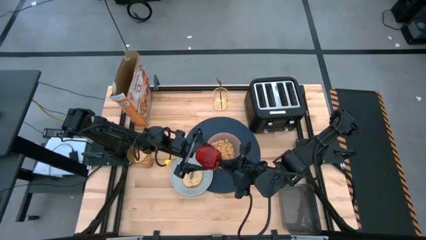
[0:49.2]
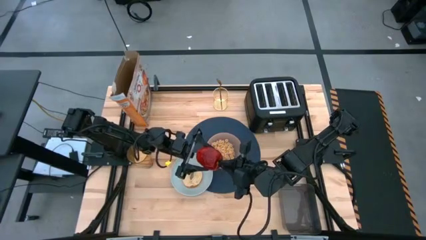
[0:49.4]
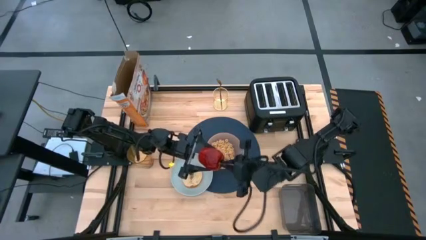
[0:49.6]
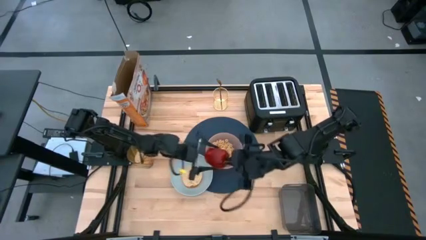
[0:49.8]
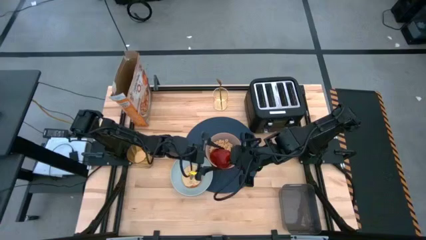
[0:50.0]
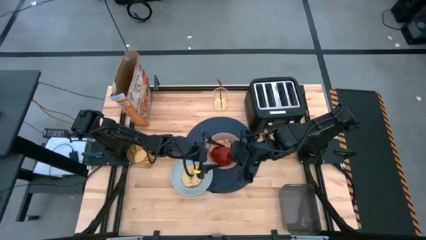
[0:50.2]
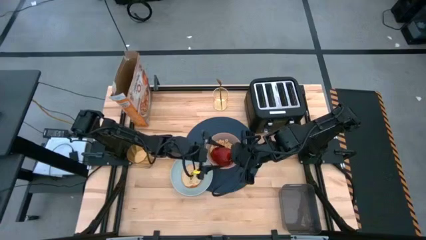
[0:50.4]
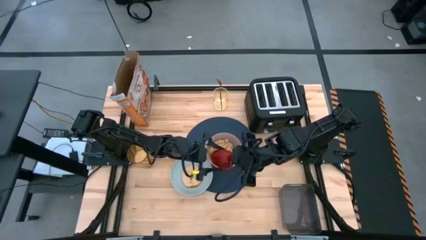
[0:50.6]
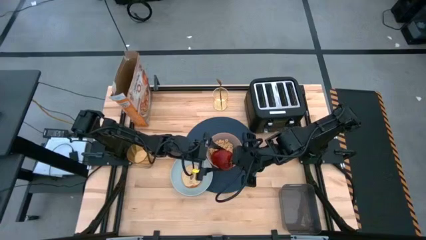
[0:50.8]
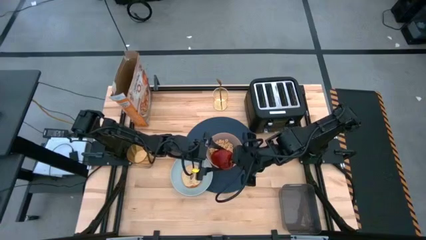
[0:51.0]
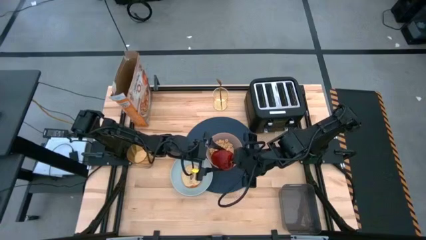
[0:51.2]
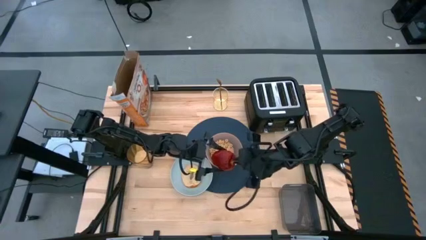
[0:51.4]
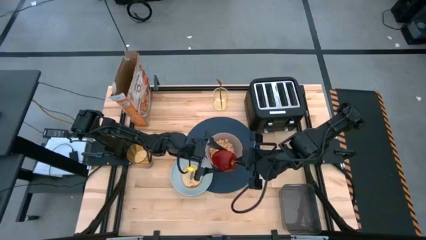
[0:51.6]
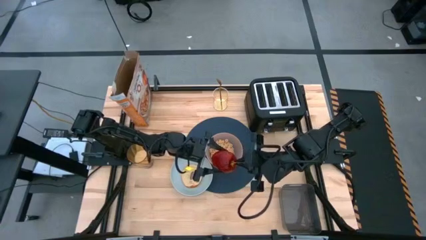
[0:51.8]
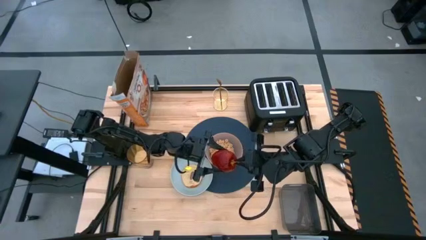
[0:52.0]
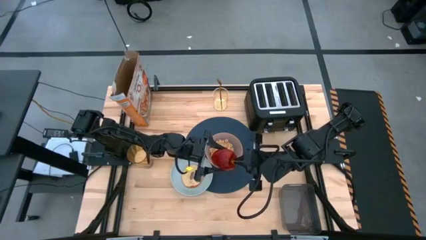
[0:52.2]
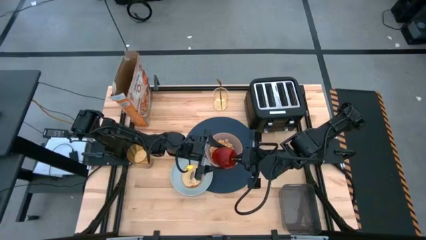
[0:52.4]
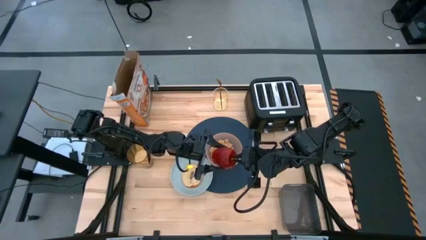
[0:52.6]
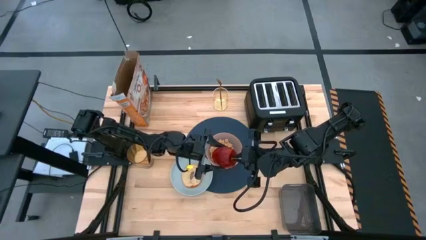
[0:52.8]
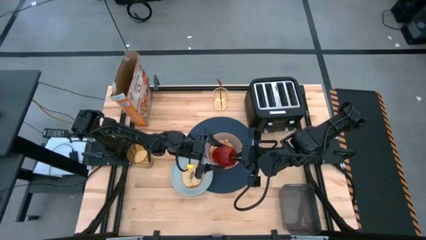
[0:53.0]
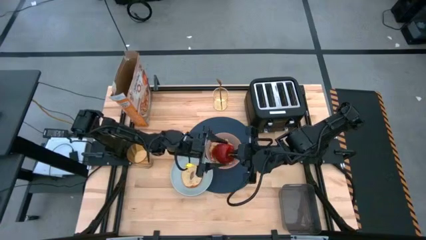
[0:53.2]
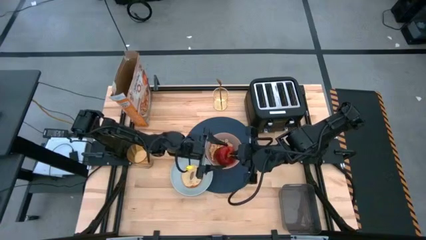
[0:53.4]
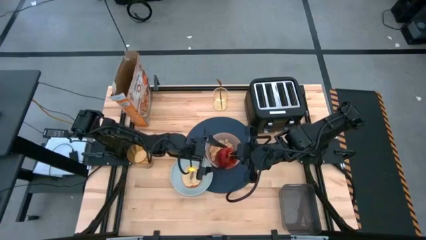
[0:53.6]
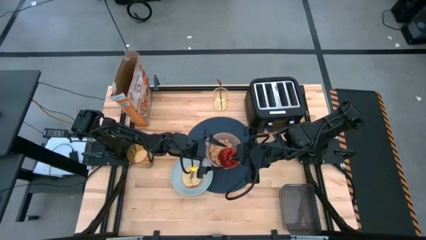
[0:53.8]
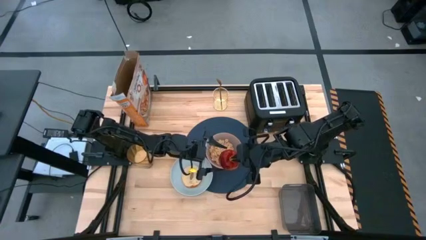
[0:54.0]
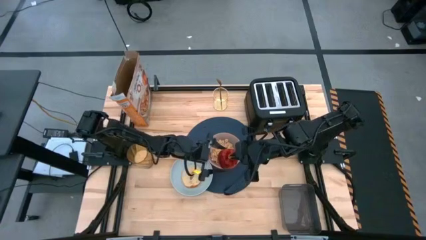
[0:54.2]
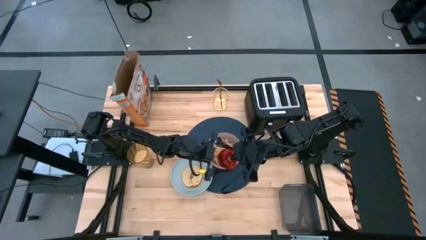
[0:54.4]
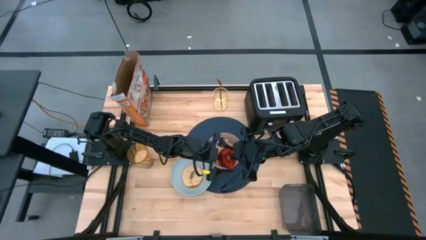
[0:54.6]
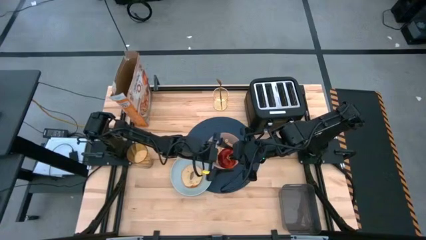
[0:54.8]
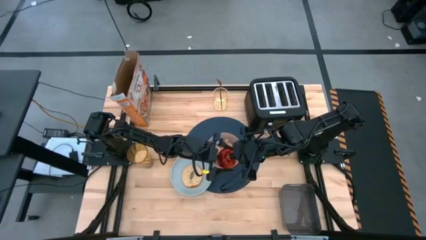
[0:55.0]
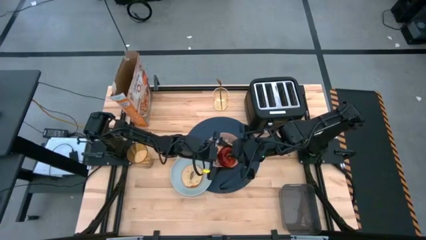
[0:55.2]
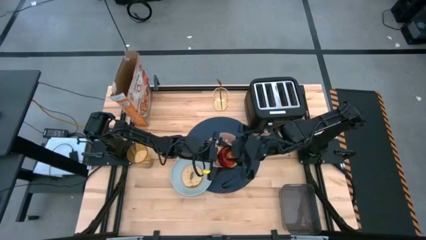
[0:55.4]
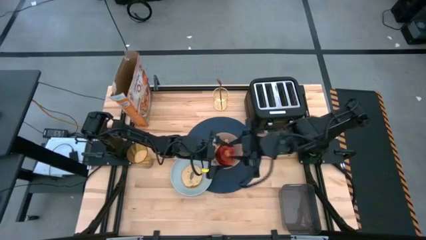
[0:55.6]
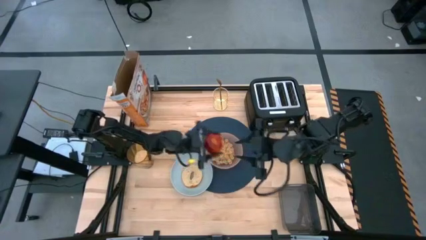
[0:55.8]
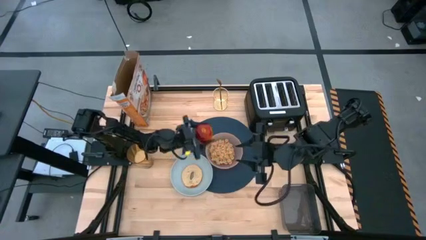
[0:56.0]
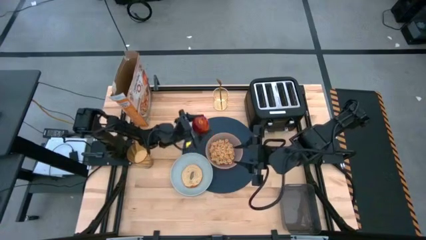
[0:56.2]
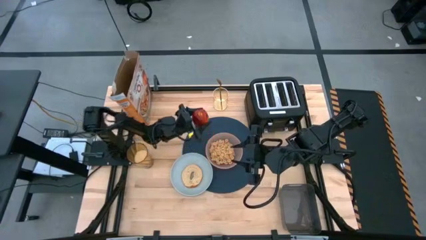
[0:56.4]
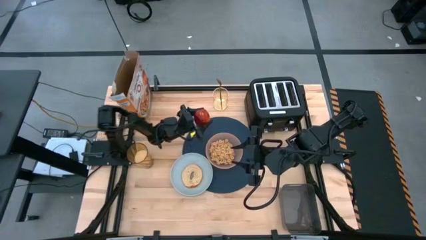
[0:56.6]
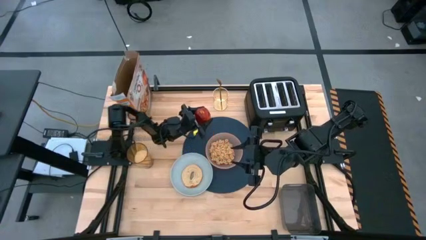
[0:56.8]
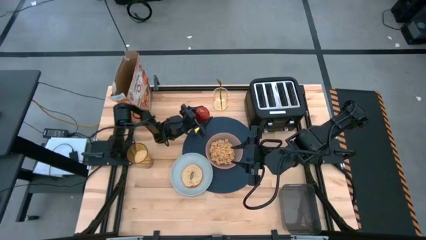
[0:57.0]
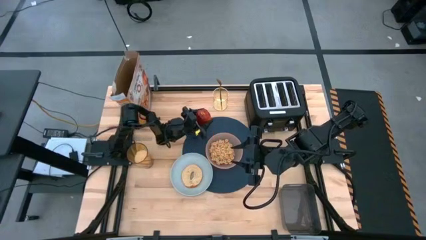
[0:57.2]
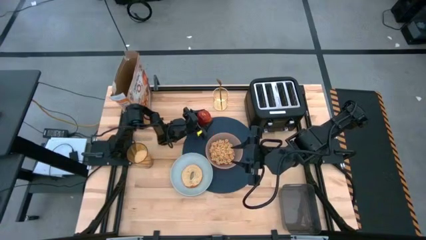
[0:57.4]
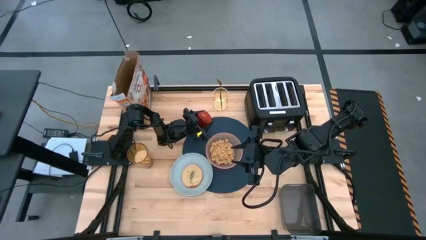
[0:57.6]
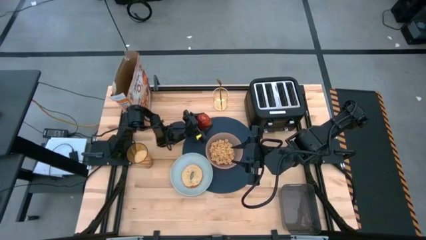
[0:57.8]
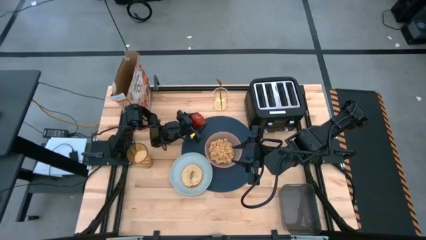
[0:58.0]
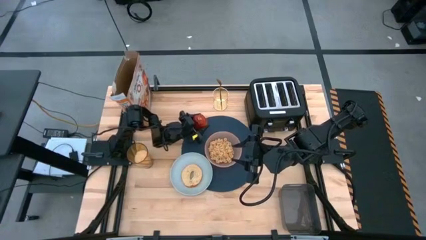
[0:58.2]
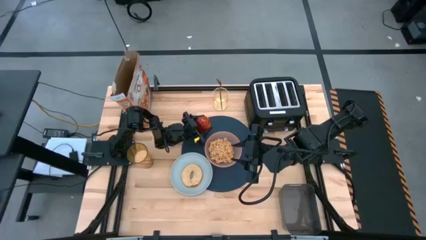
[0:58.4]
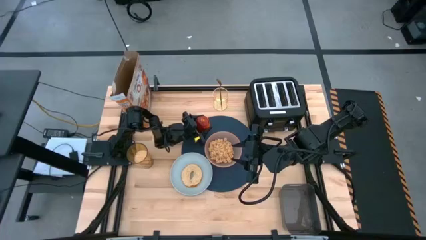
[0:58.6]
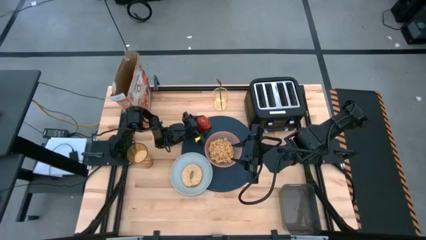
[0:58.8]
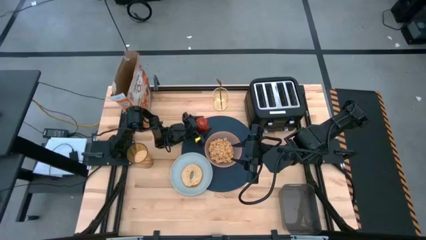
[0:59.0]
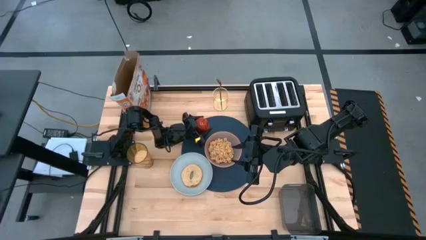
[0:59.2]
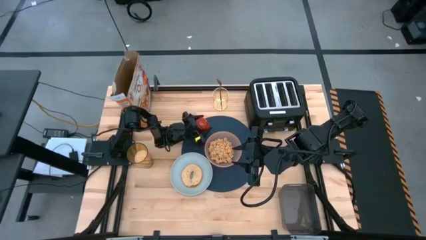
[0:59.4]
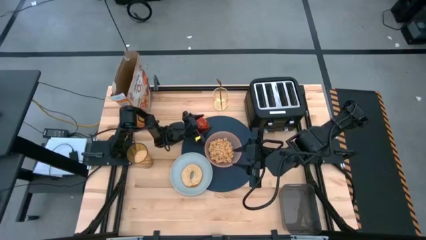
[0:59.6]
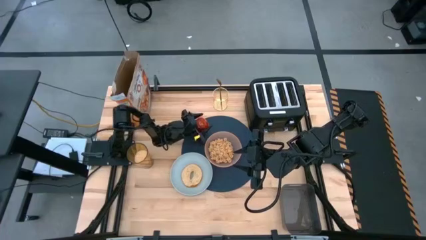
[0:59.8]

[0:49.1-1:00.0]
Task: Arrange a breakfast setting
Put the red apple on the blue table mat to the top left of the pink bowl

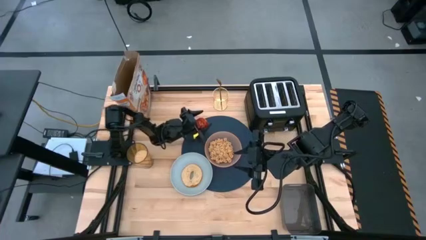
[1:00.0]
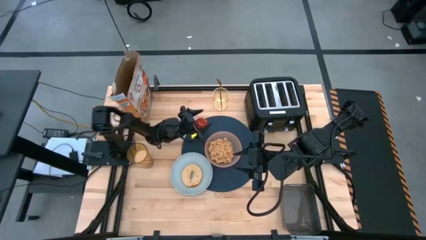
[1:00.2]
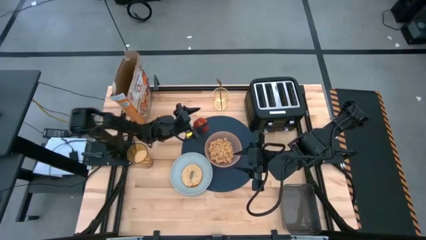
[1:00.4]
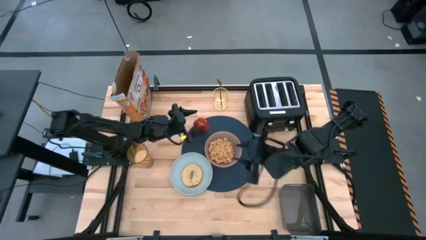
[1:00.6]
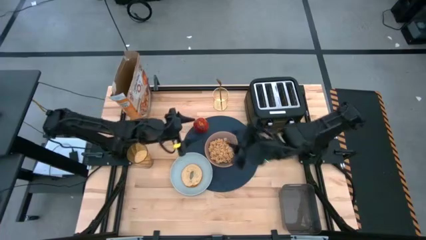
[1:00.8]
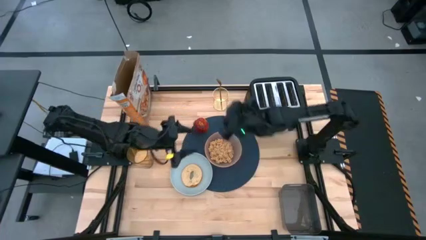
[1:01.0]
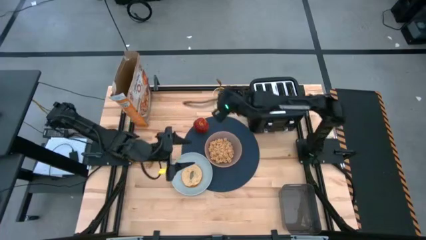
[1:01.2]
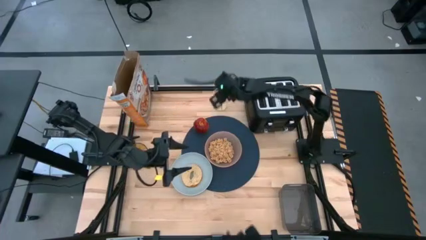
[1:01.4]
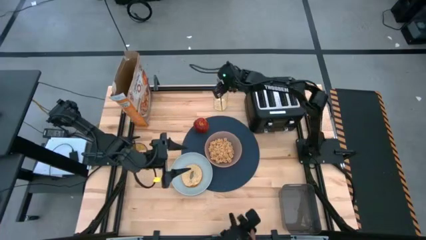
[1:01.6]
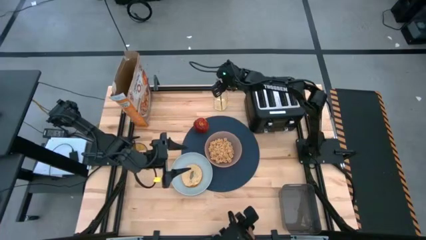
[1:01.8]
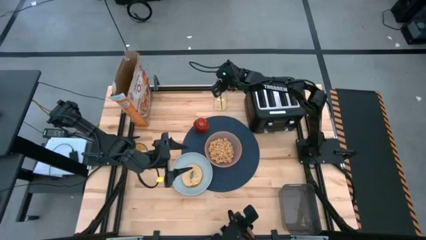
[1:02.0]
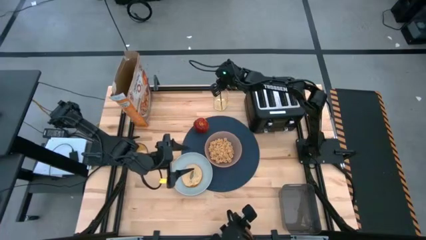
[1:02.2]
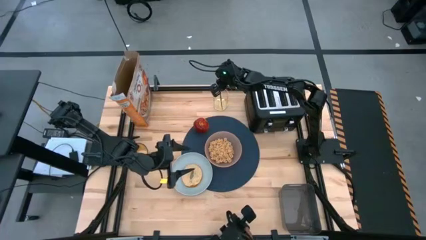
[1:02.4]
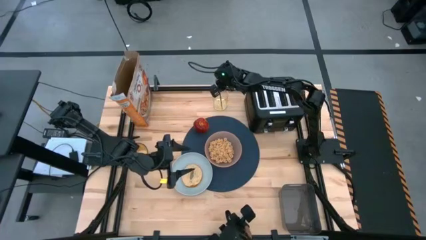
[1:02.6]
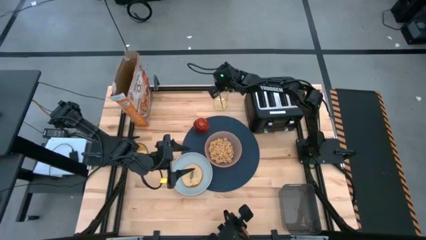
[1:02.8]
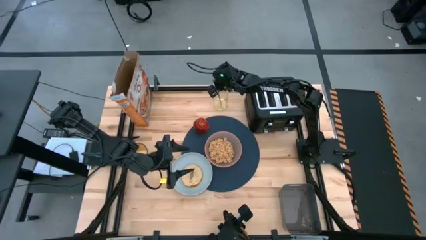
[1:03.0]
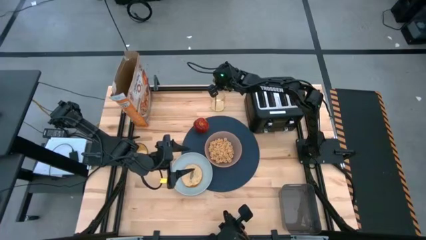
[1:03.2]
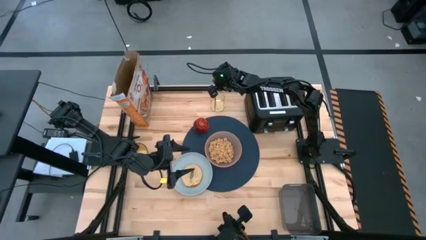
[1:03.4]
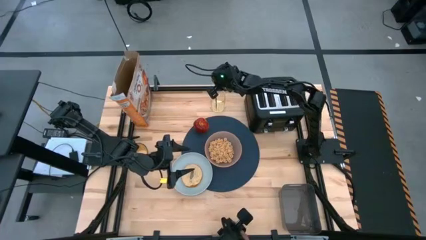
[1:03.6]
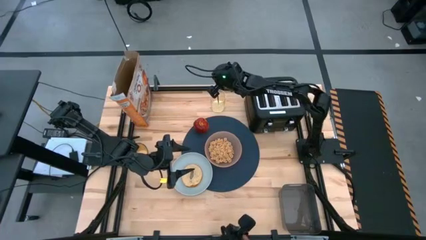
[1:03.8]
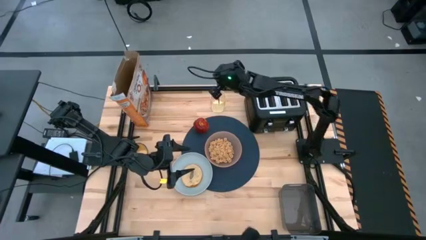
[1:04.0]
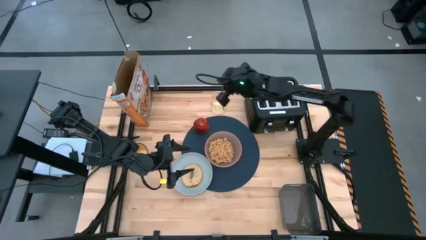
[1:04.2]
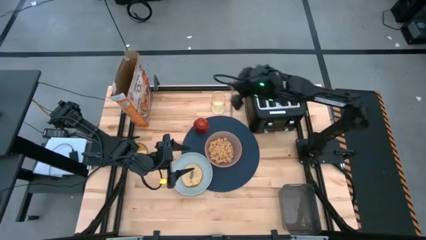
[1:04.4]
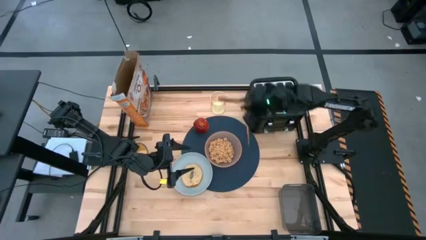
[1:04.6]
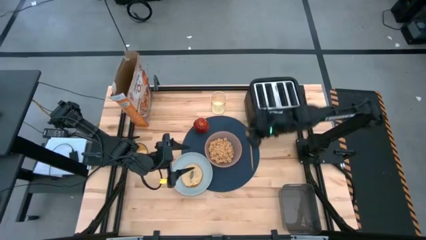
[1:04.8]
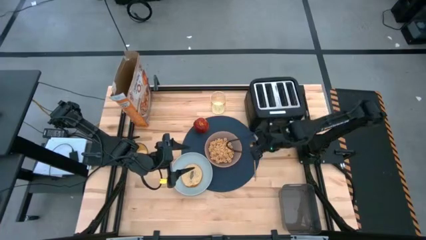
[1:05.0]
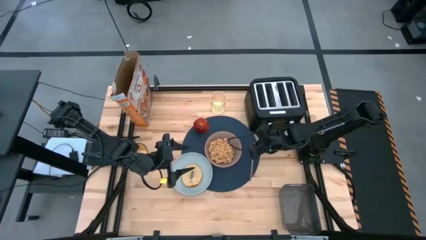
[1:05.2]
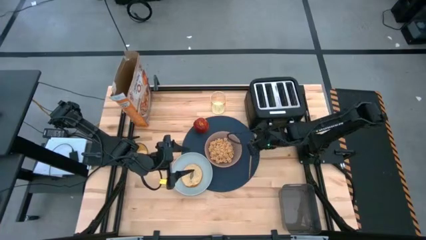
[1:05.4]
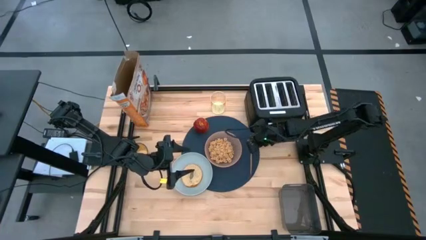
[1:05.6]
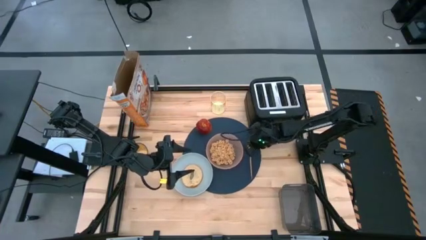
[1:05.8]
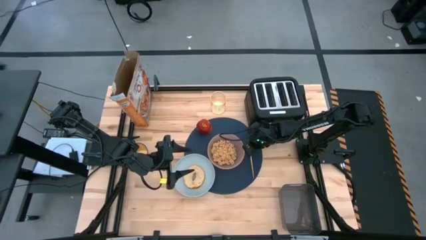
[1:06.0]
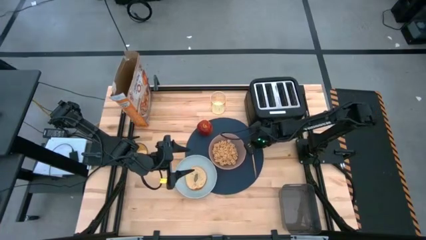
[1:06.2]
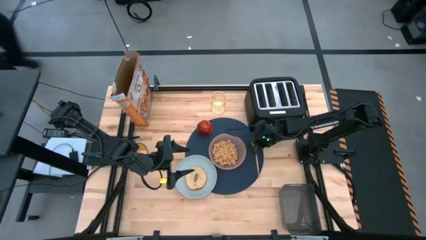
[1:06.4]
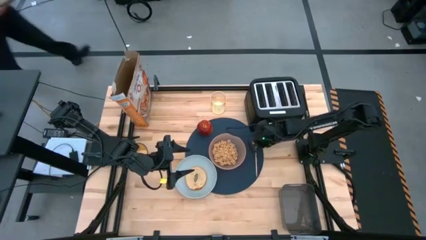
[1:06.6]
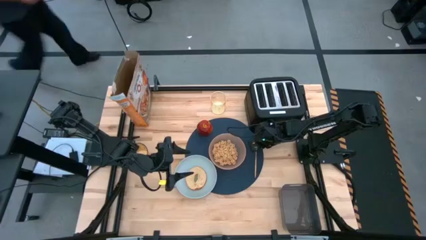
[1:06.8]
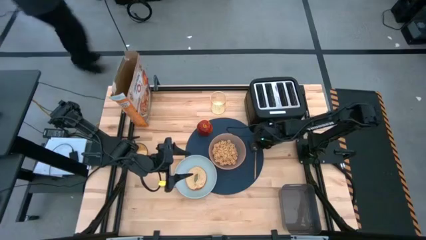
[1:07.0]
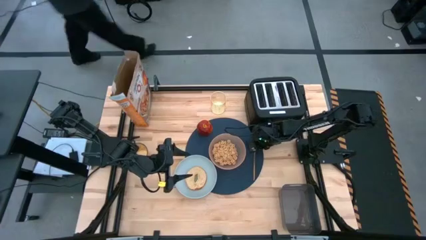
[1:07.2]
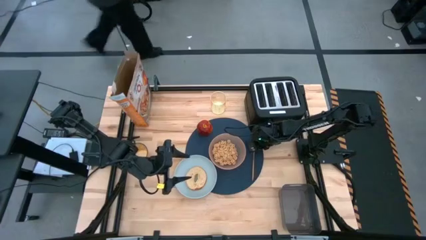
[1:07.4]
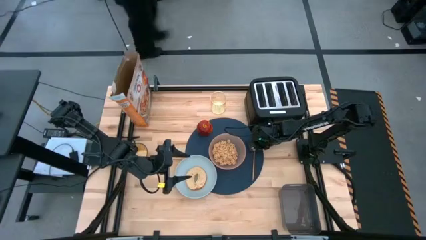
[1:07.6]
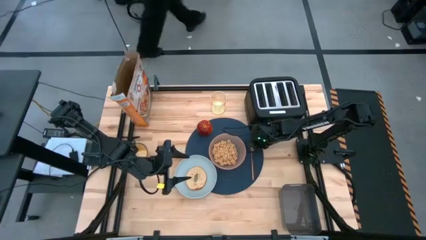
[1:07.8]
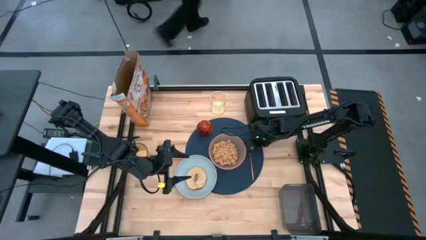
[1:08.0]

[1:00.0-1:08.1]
Put the spoon on the blue table mat to the right of the pink bowl
